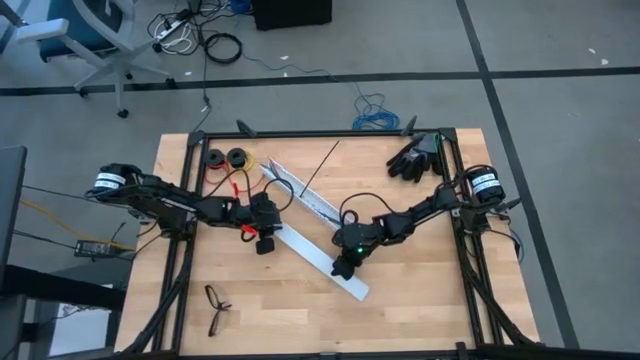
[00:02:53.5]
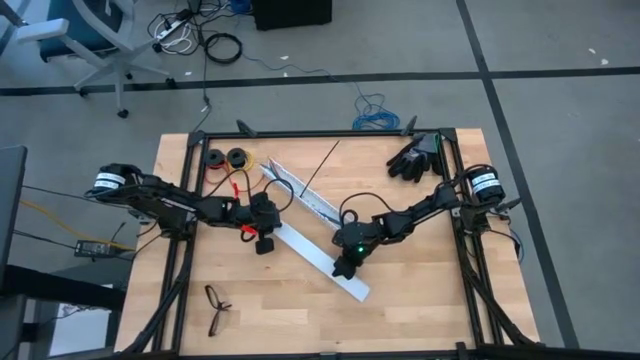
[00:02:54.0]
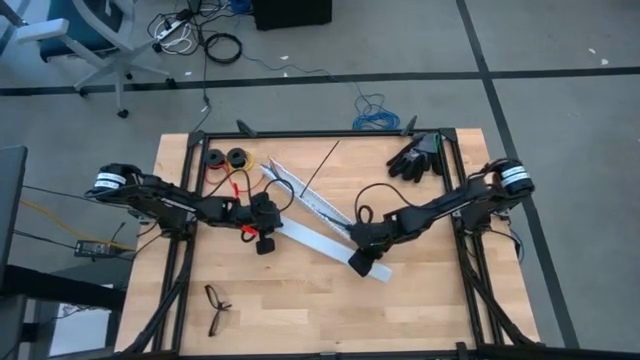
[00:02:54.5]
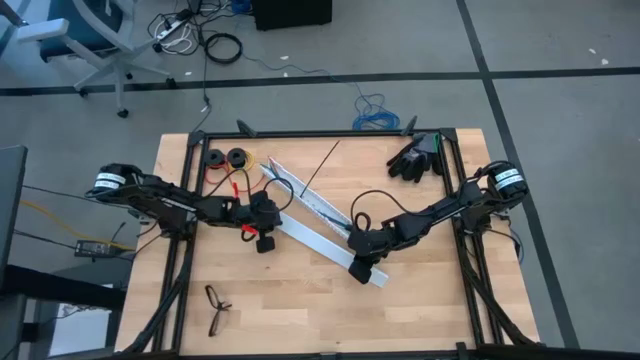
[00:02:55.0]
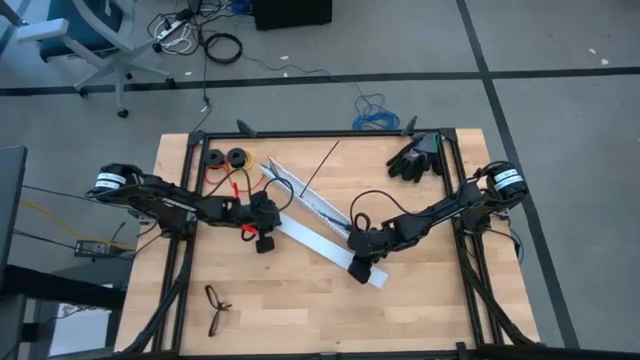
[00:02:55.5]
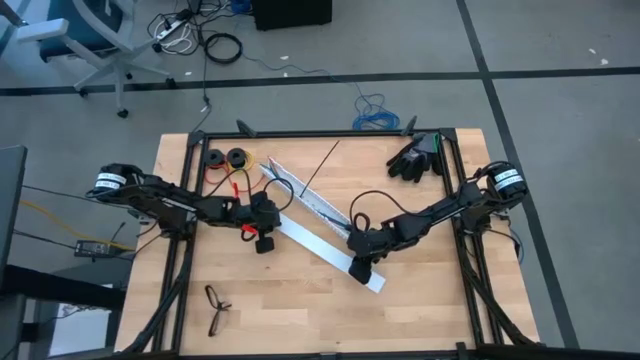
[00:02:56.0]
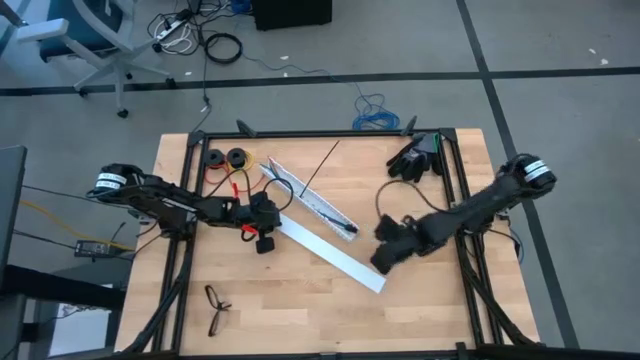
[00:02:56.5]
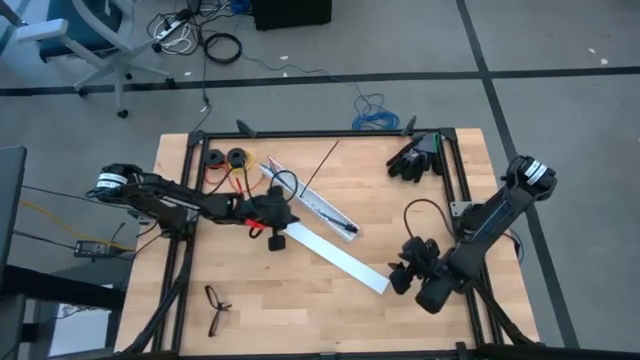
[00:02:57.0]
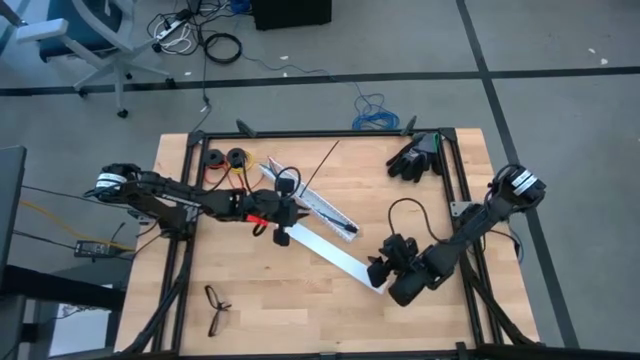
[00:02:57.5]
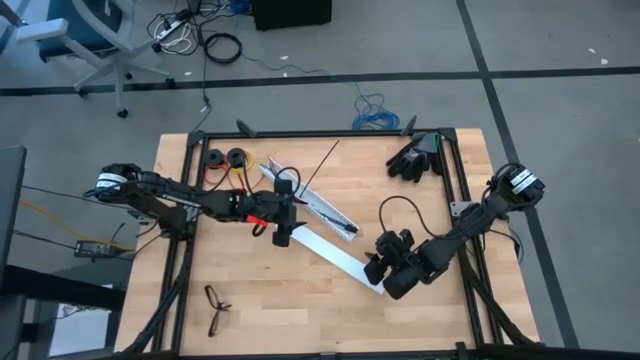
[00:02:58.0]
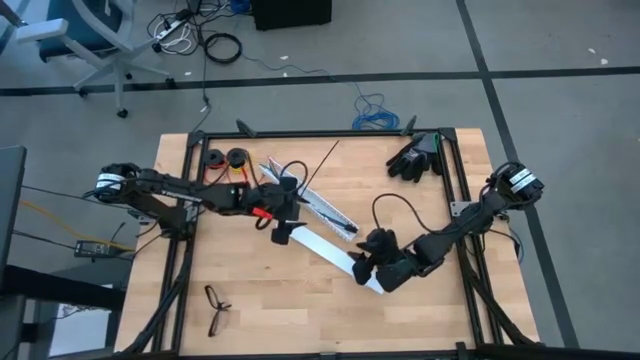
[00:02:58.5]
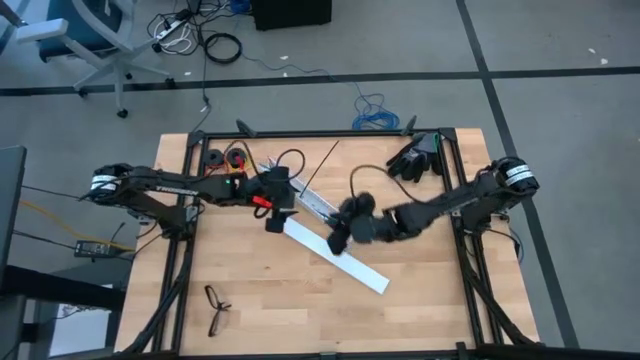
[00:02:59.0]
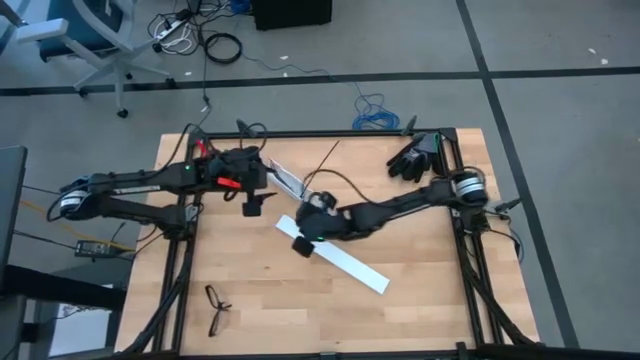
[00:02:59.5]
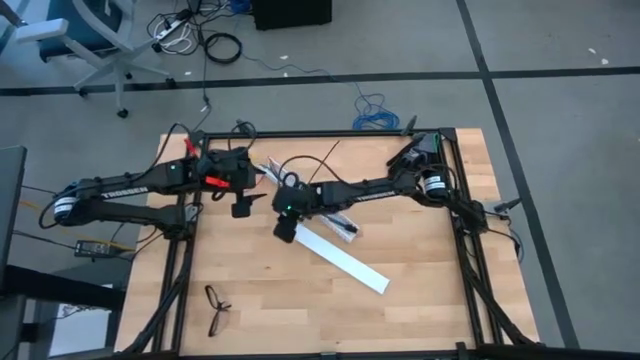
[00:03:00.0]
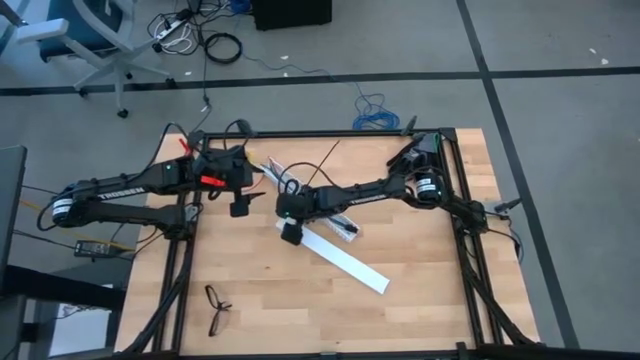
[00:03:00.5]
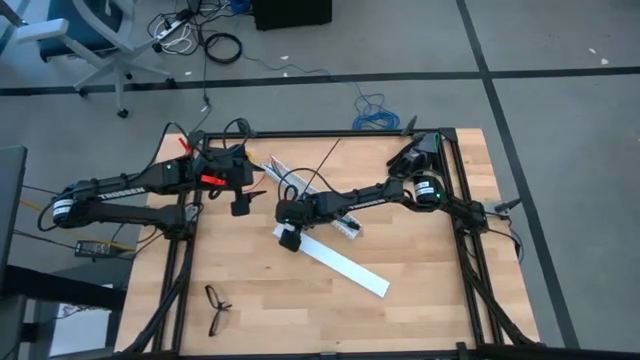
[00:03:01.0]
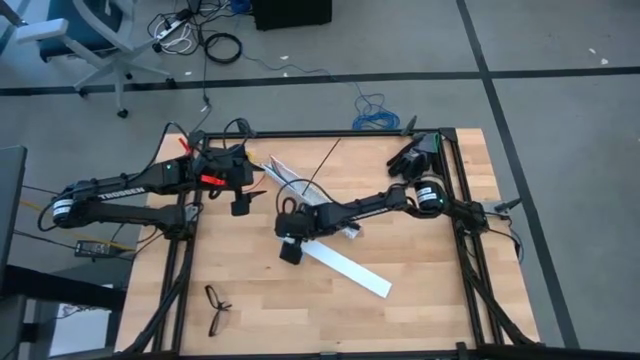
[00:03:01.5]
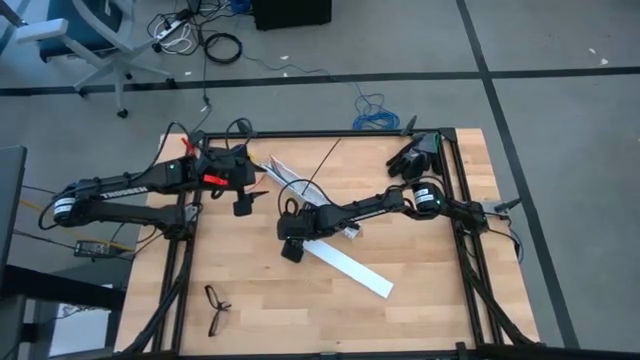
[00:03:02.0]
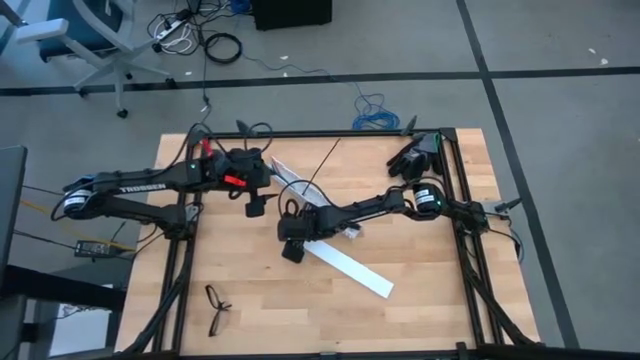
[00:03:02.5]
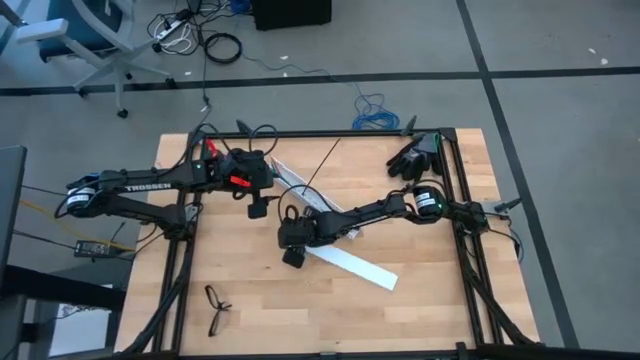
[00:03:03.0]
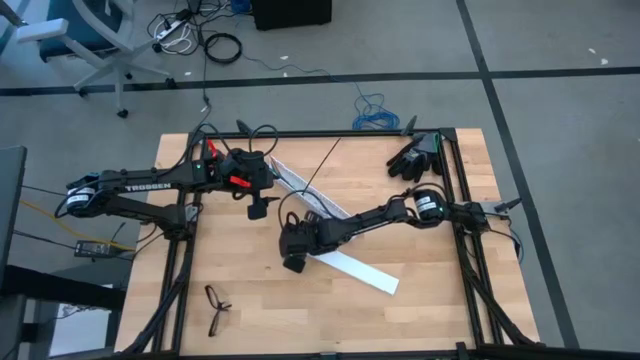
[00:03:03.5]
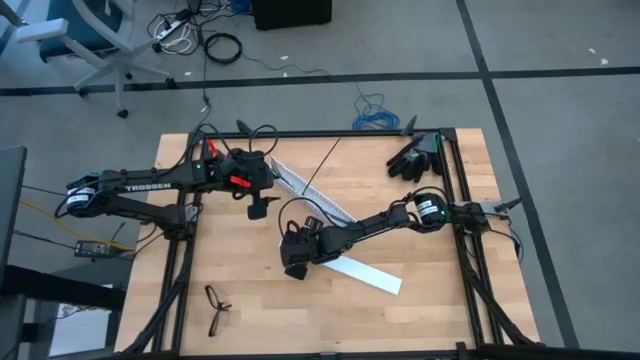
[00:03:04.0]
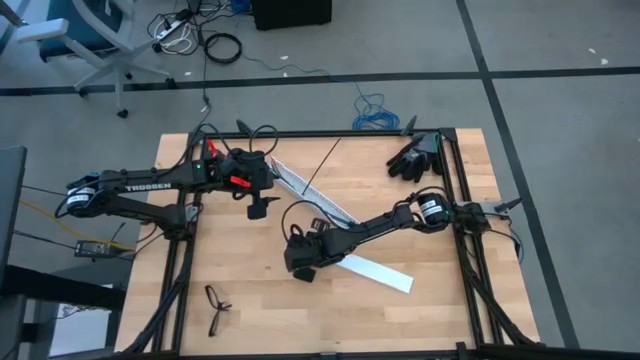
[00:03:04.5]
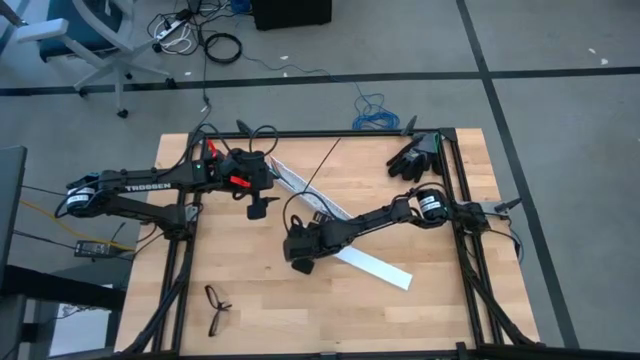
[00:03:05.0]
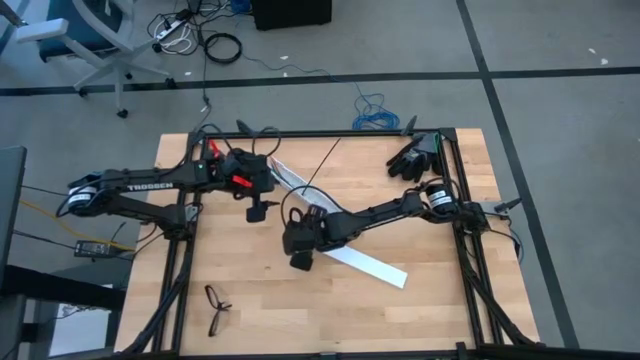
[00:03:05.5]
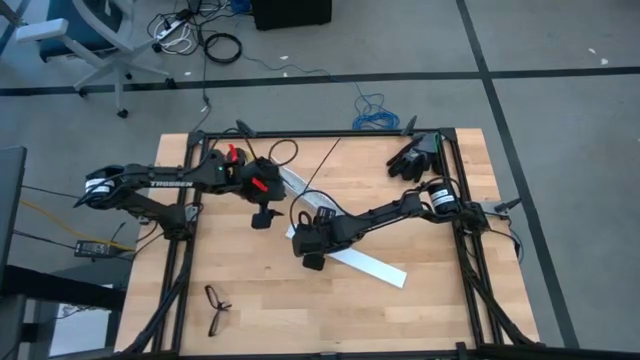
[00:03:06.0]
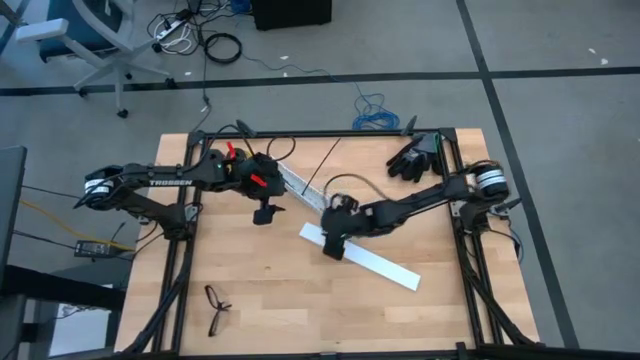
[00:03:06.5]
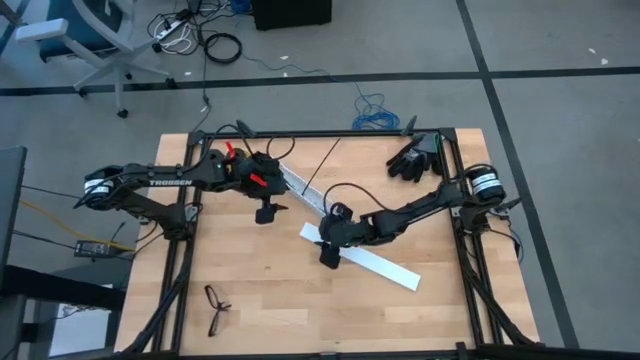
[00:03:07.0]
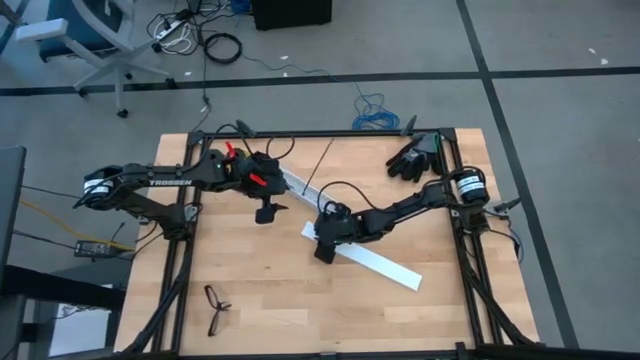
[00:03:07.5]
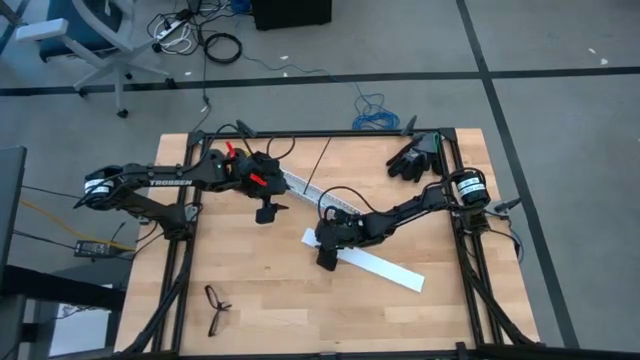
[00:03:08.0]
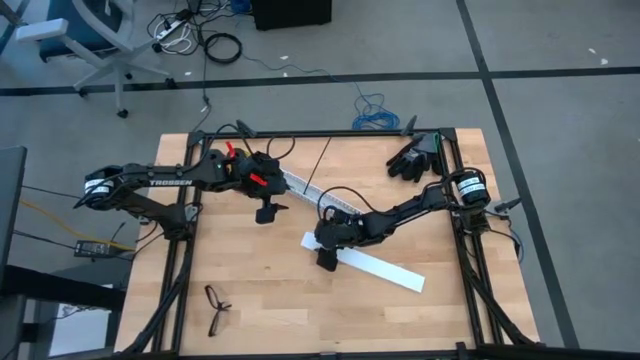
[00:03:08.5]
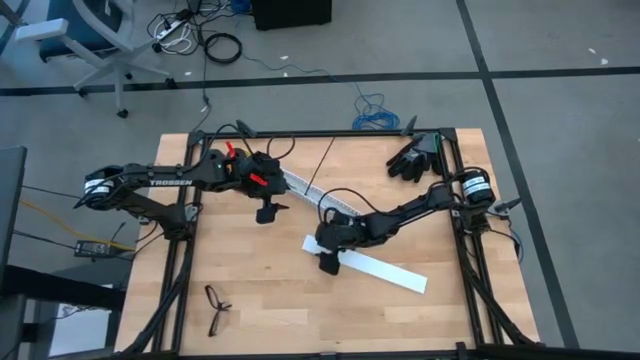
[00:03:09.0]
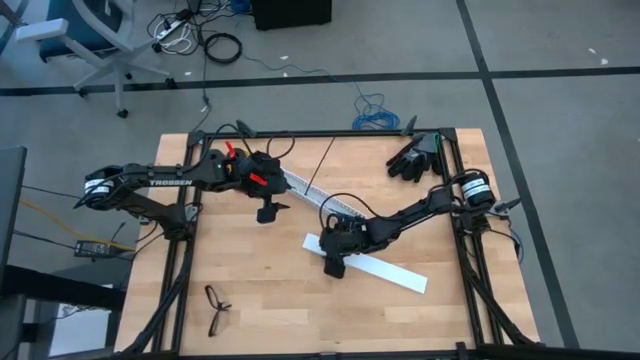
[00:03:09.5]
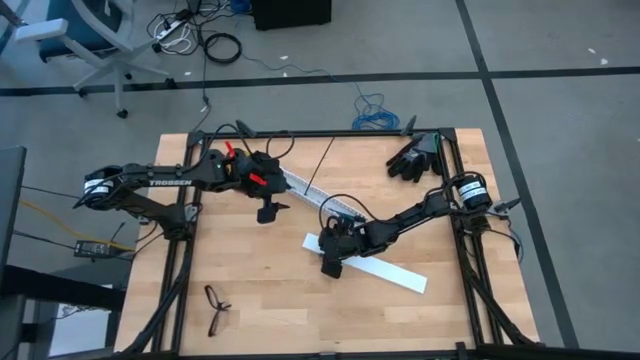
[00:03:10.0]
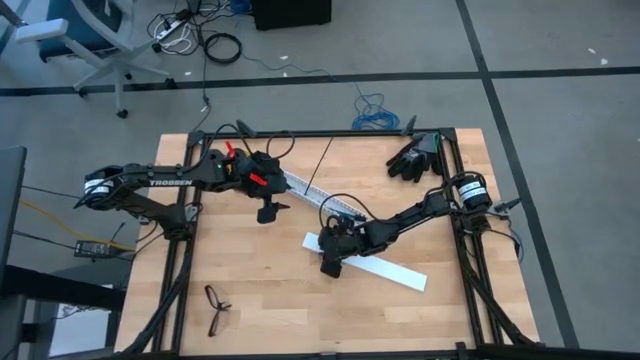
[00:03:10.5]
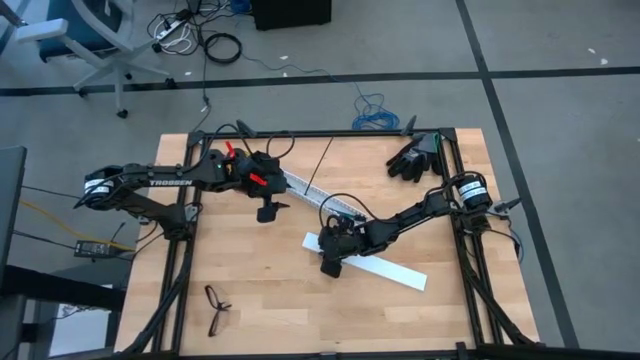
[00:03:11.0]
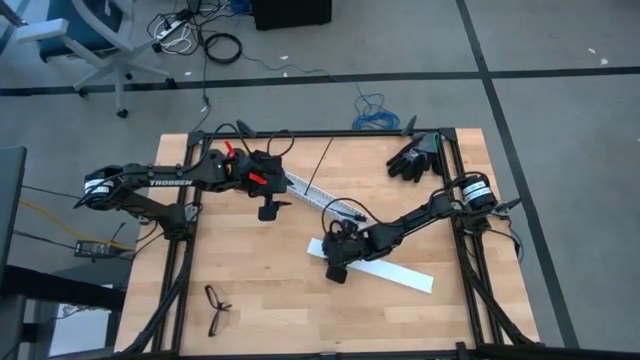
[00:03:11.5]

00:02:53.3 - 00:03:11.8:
Task: Ziptie cables
Close the white cable duct

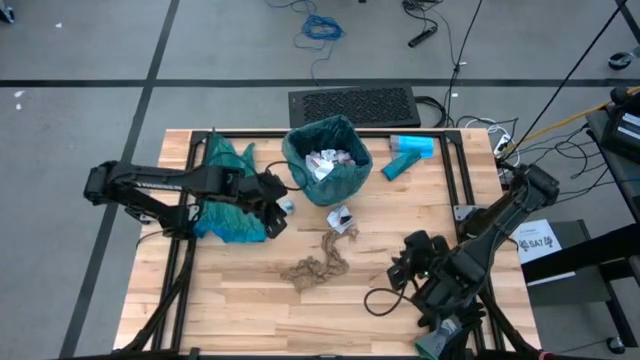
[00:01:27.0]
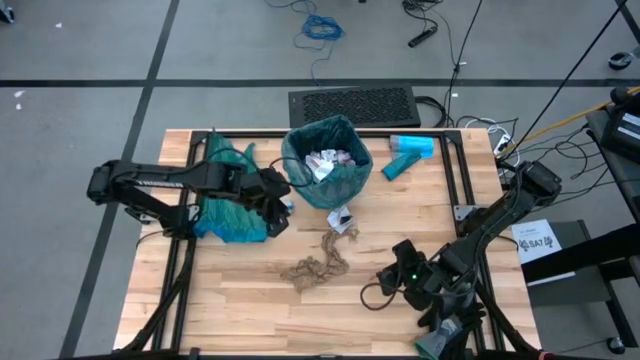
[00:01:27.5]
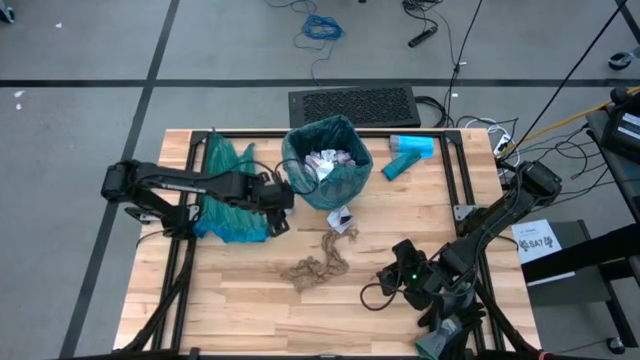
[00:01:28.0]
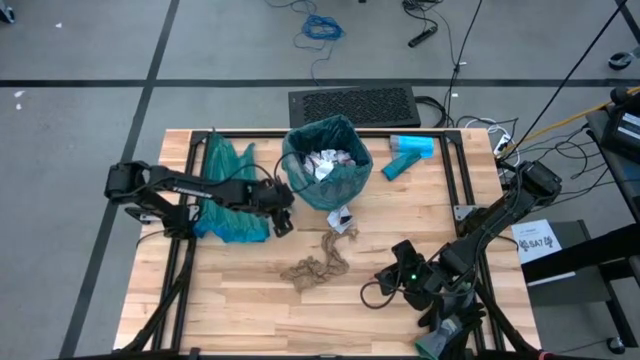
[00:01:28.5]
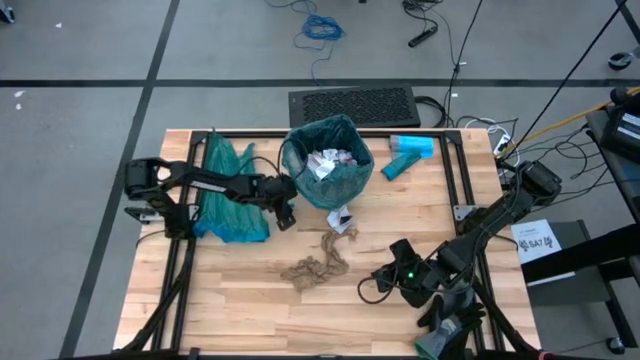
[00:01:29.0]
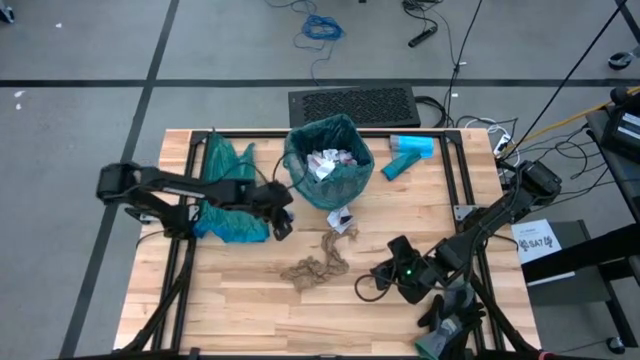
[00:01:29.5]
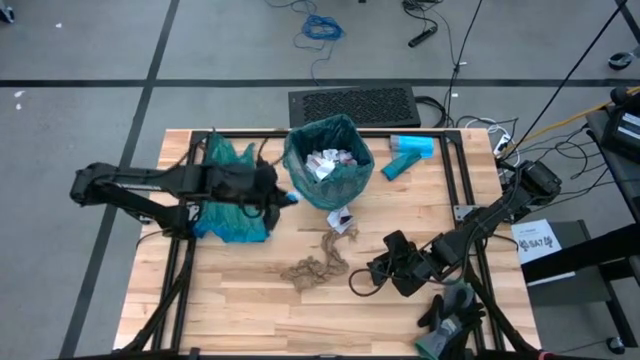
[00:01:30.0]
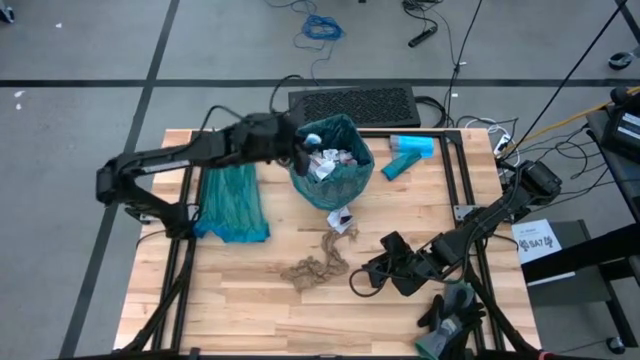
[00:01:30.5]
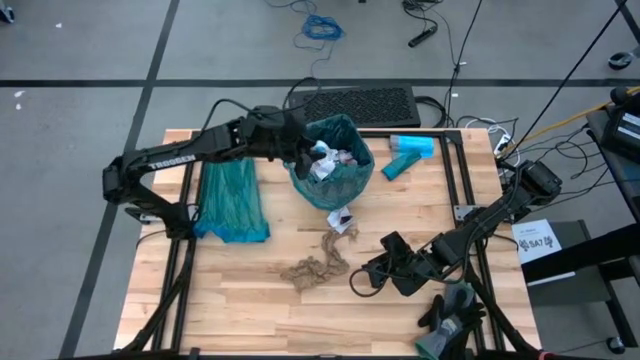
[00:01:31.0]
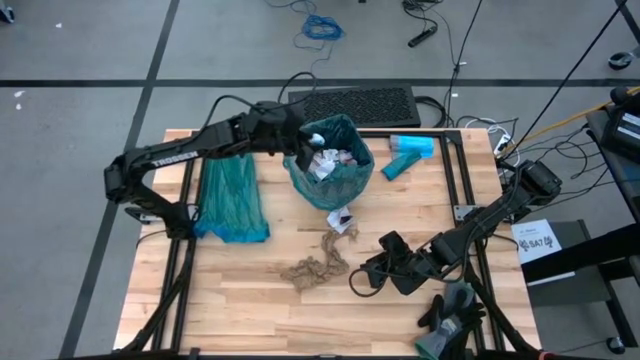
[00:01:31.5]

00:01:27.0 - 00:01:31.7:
Task: place trash/remove bag and relplace
Put the blue plastic into the blue trash bag inside the black trash bin
